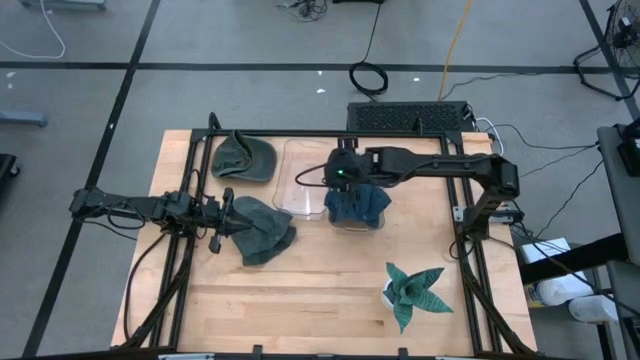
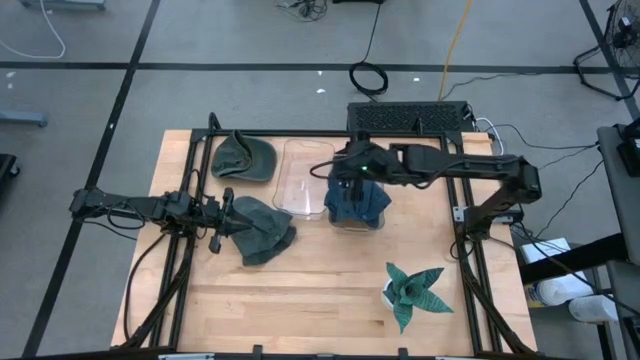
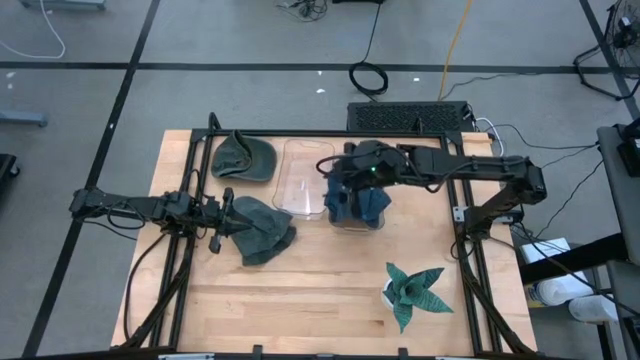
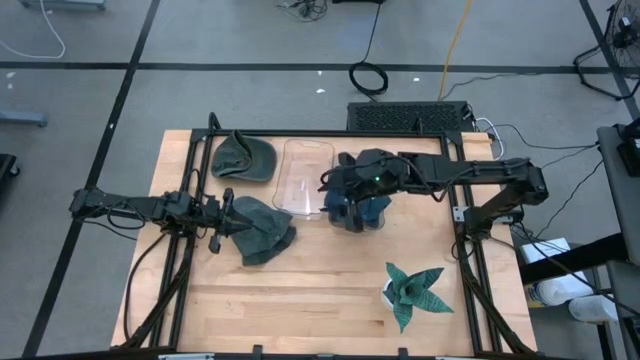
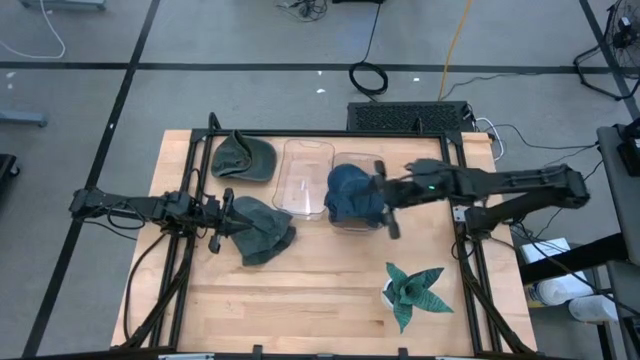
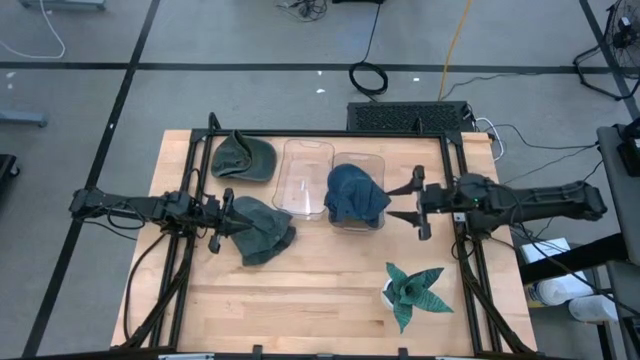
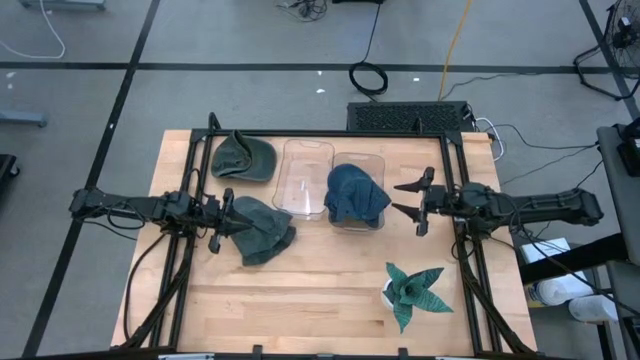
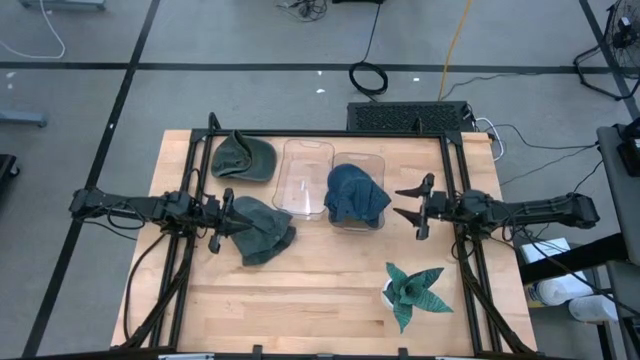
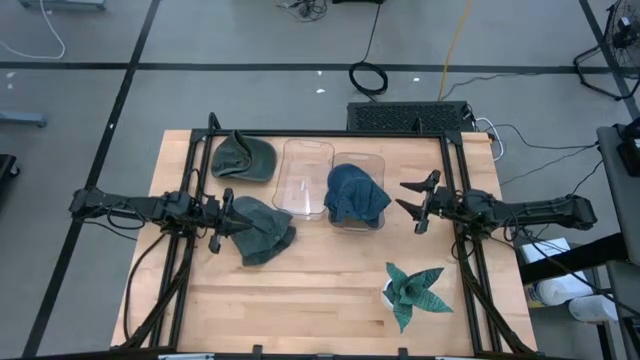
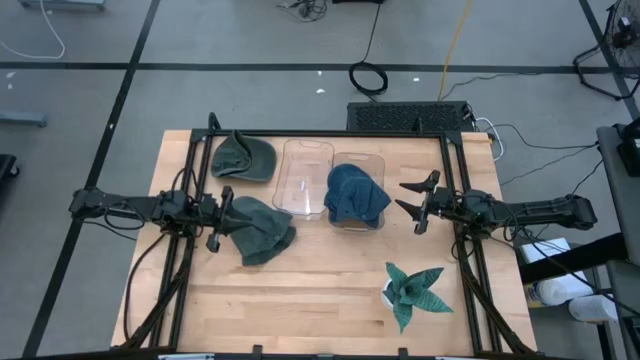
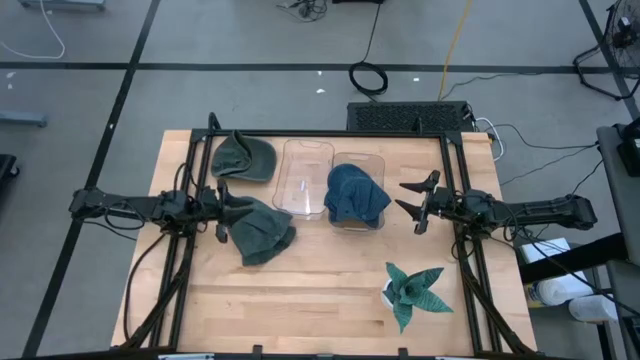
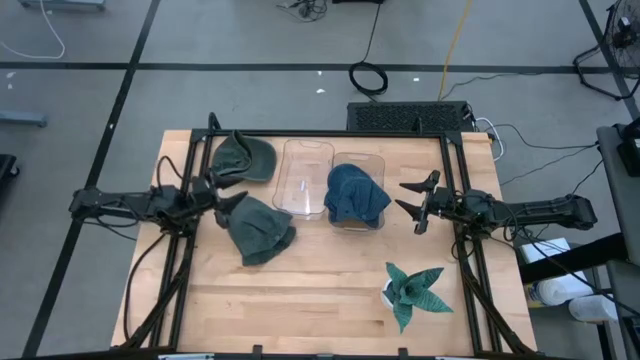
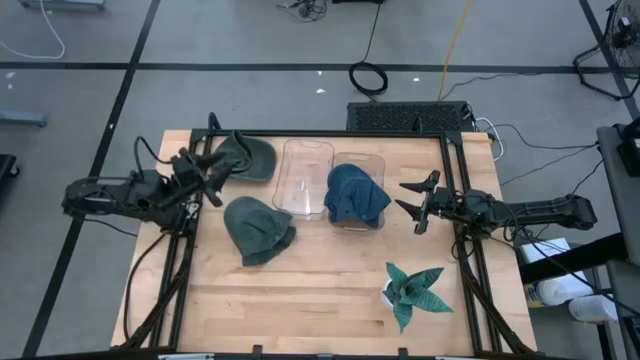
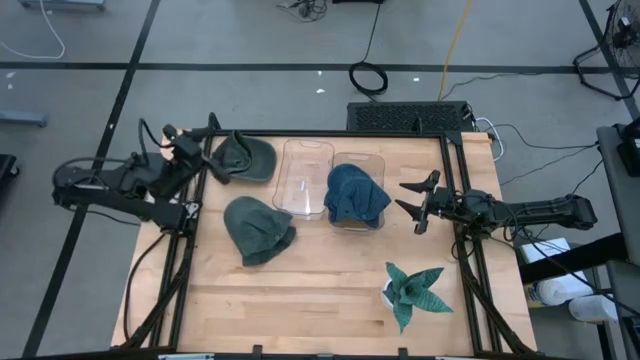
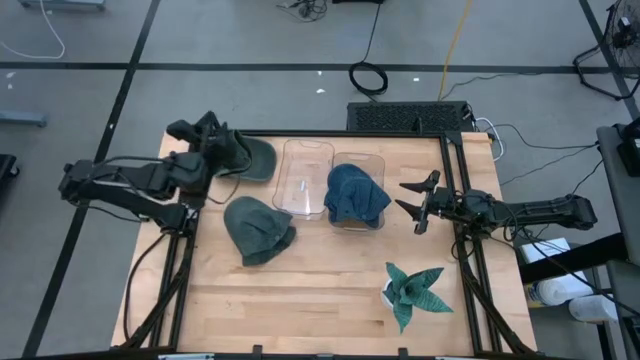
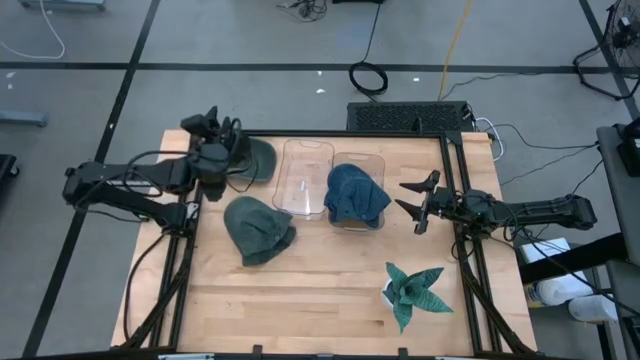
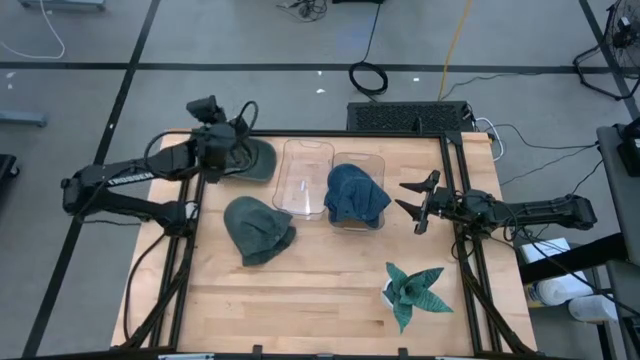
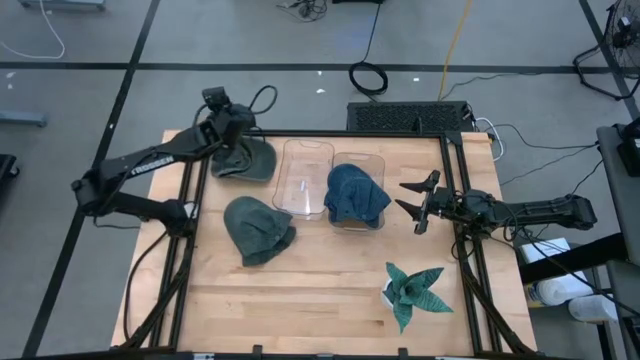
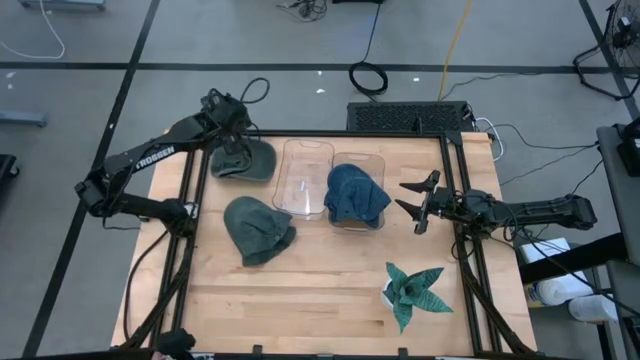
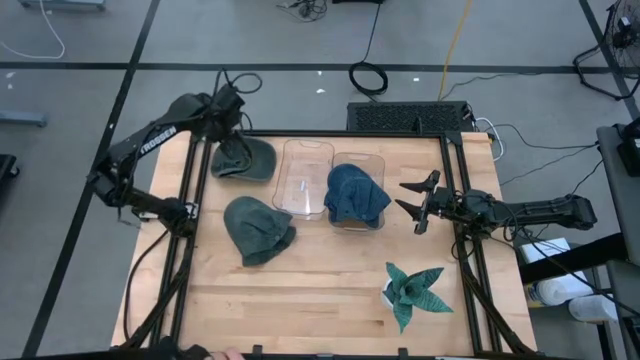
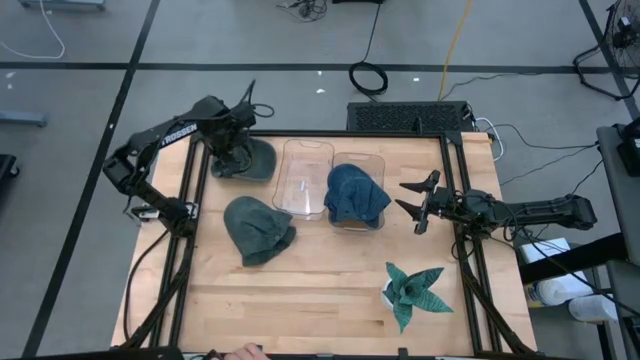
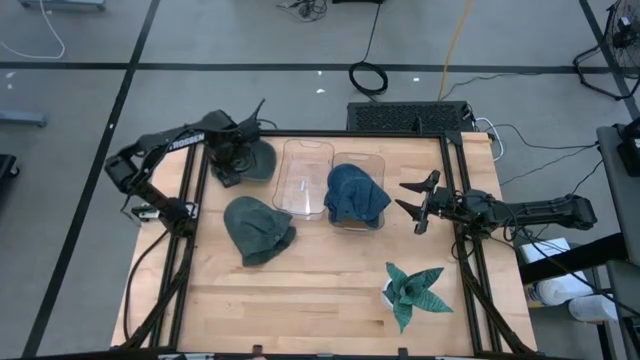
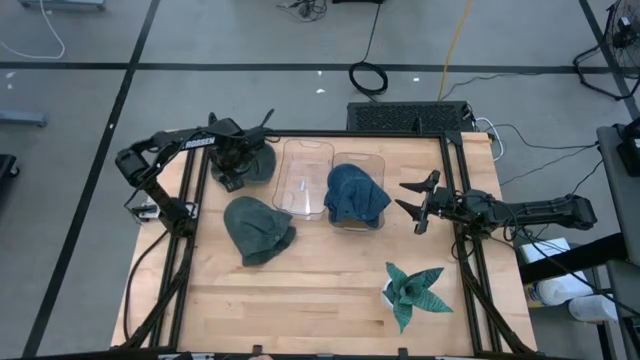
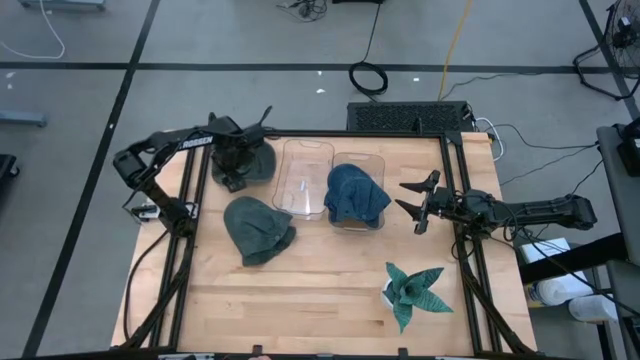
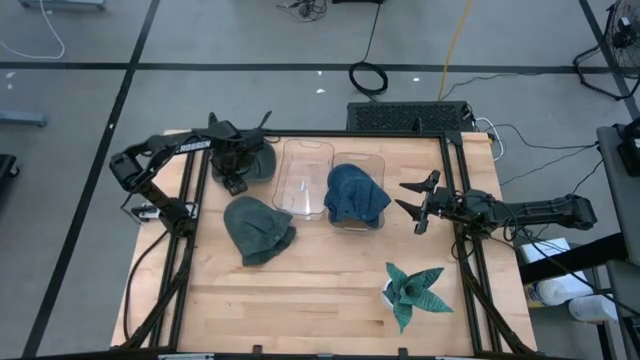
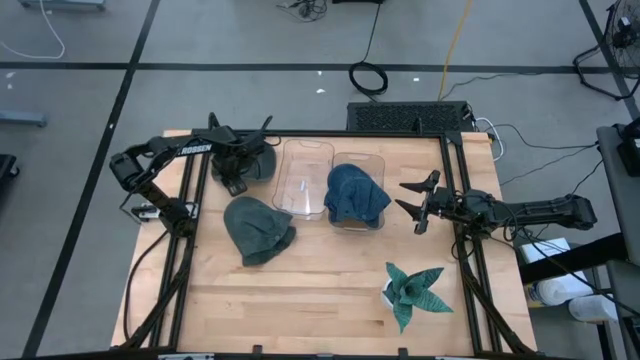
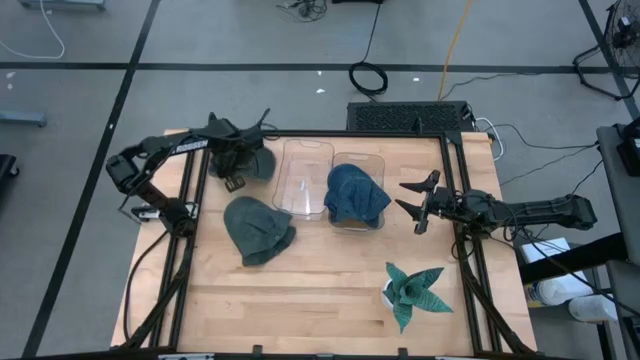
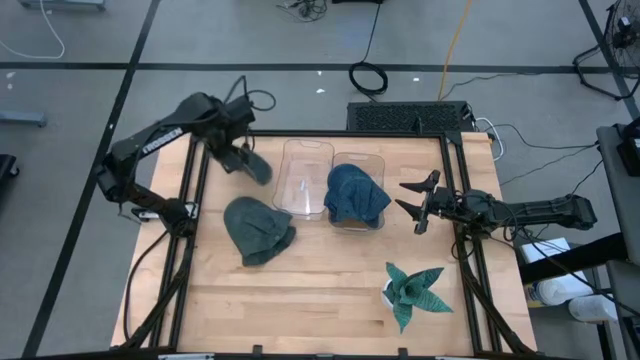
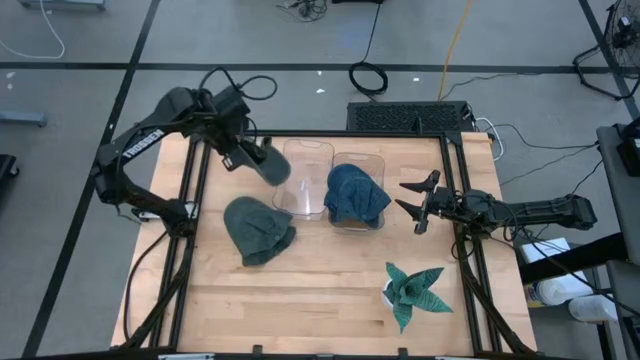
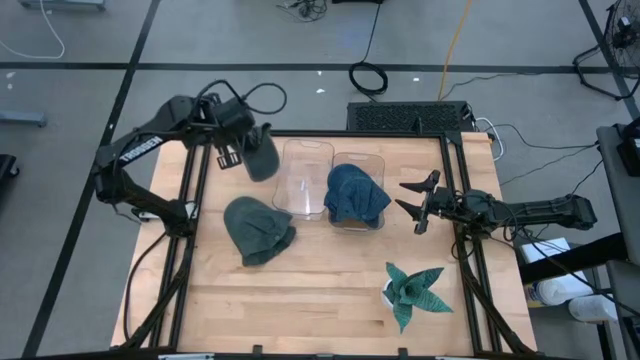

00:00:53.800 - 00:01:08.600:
Task: Pick & Place hat
Put the top black cap into the left transparent bin
